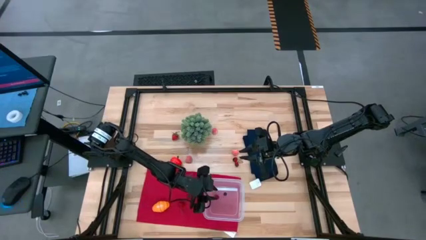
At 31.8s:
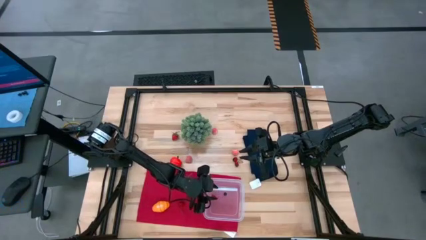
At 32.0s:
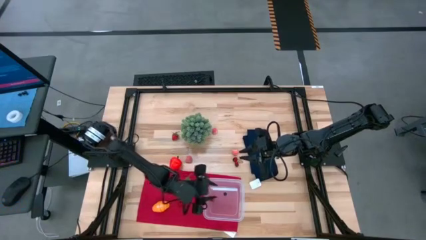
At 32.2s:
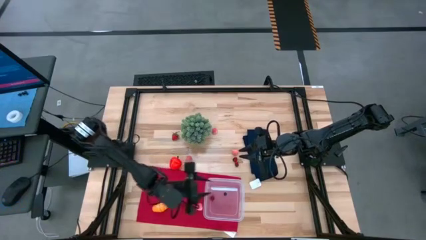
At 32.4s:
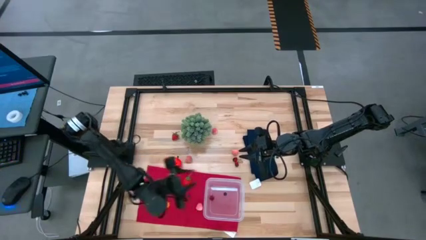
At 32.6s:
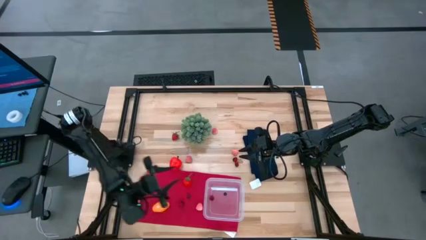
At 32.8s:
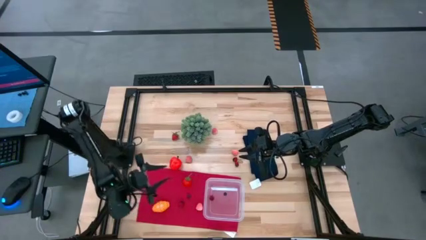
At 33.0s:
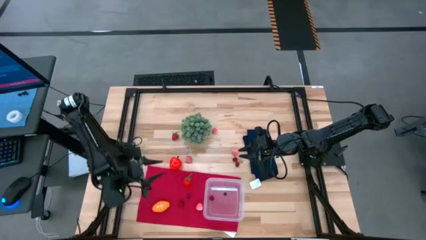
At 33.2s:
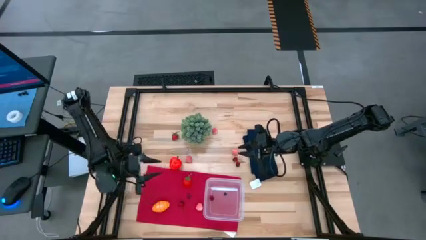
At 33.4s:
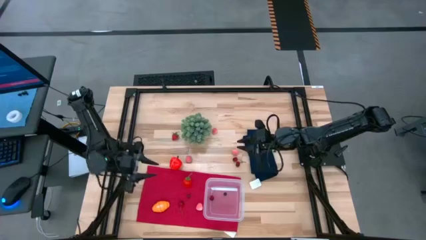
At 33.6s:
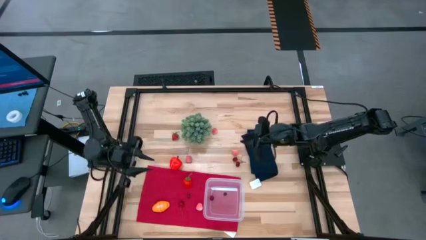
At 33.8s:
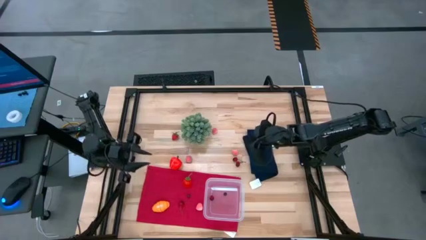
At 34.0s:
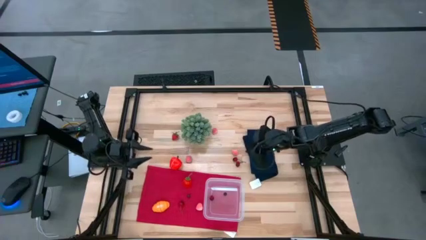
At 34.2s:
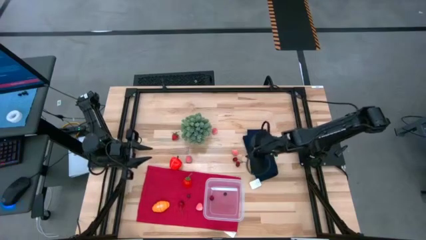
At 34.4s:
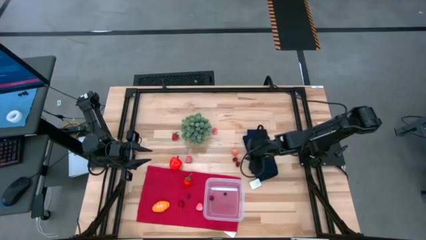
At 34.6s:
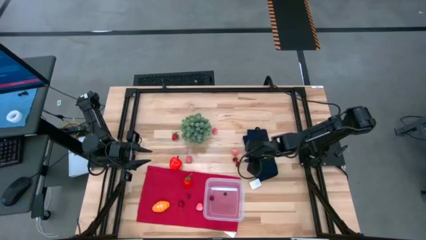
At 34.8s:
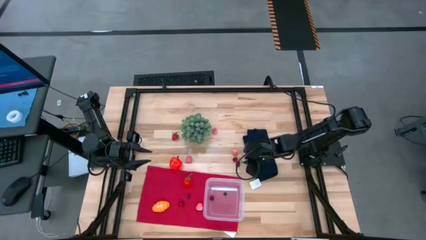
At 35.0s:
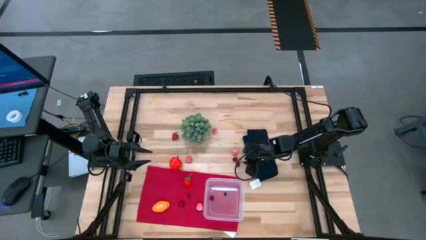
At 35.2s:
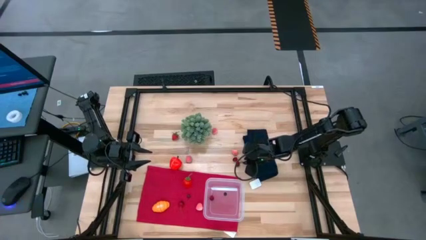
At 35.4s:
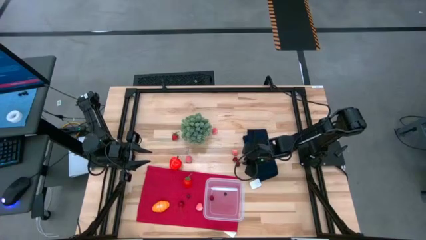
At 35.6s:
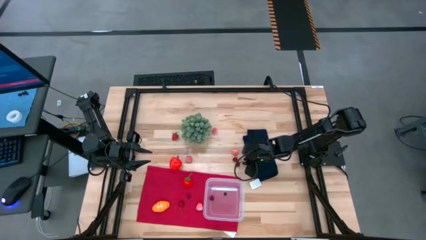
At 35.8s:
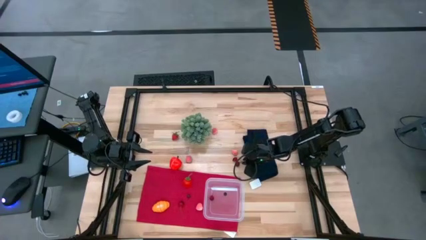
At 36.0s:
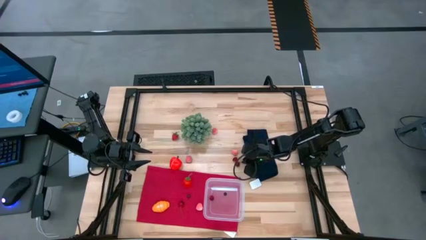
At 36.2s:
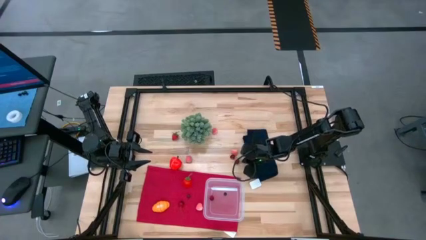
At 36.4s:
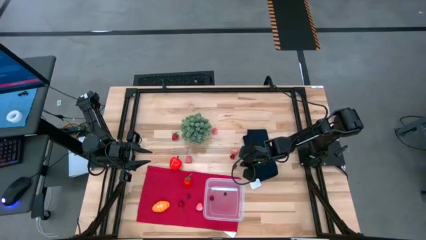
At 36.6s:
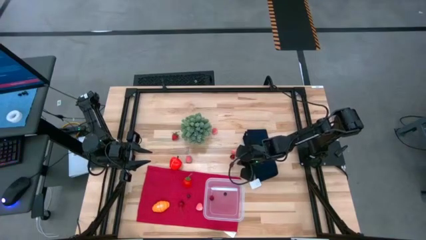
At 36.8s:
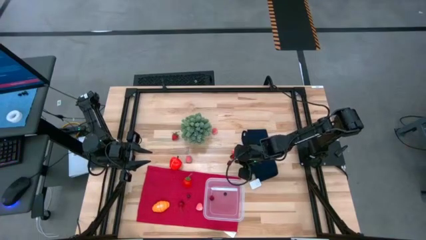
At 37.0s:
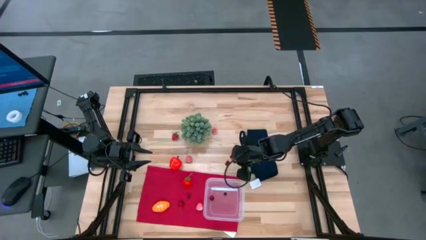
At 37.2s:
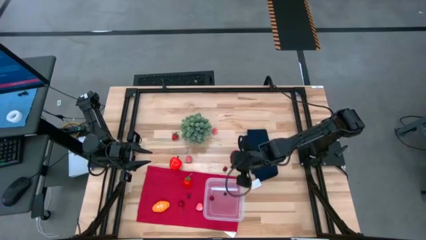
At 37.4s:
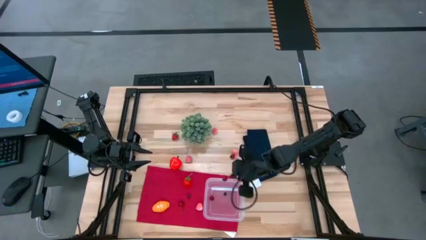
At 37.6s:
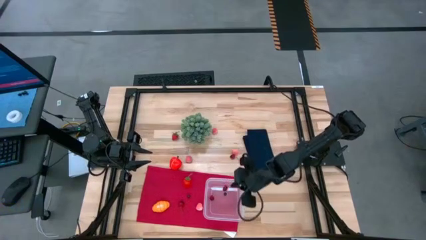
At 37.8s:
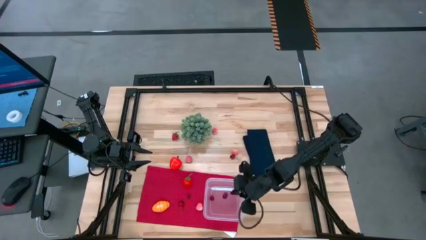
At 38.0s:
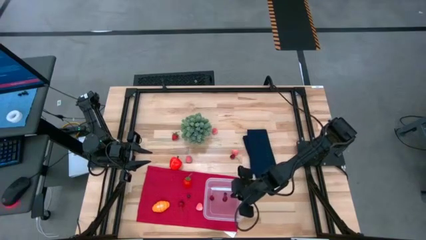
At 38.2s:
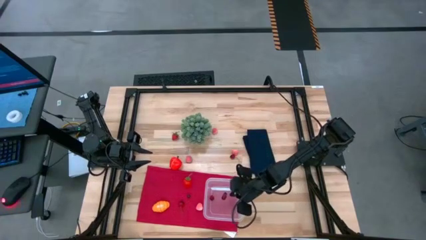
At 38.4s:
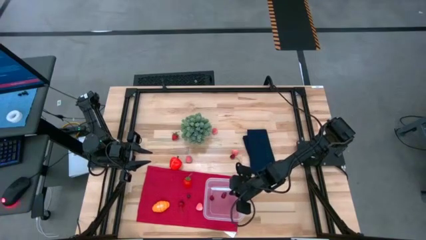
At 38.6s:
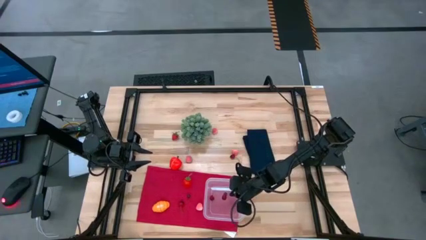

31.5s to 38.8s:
Task: Pick and placing Produce into tupperware
Put the middle cherry into the transparent bin

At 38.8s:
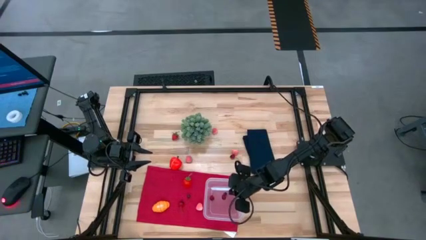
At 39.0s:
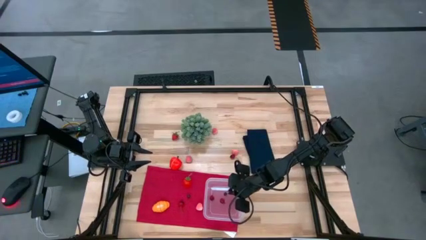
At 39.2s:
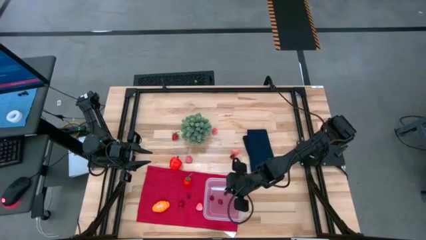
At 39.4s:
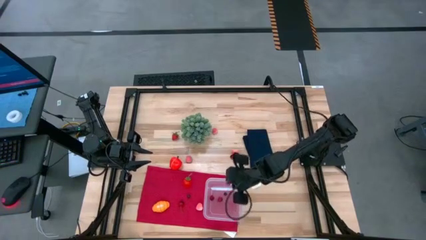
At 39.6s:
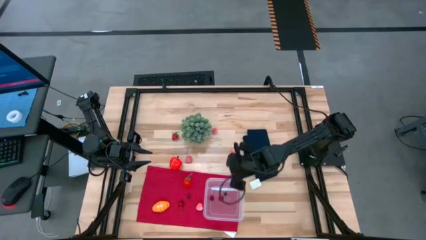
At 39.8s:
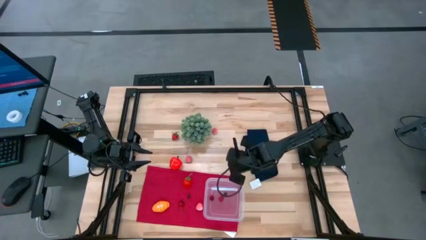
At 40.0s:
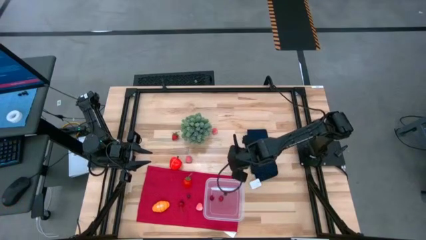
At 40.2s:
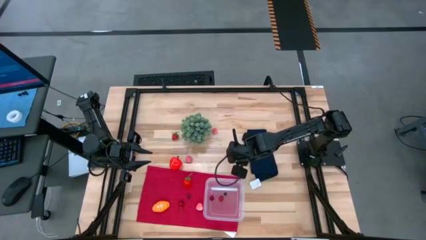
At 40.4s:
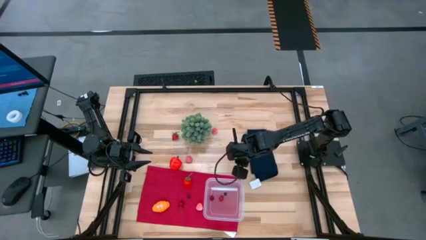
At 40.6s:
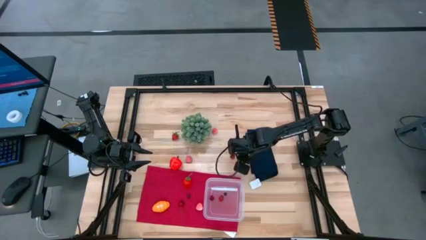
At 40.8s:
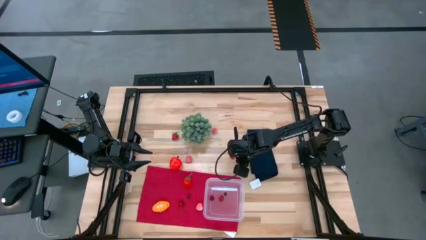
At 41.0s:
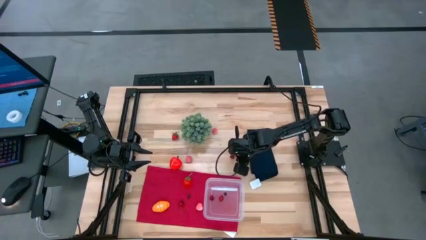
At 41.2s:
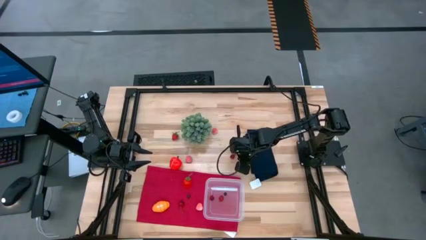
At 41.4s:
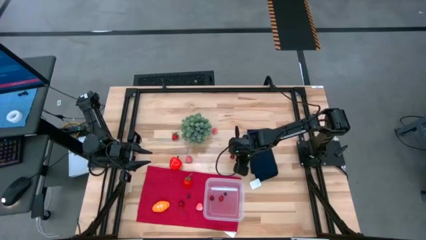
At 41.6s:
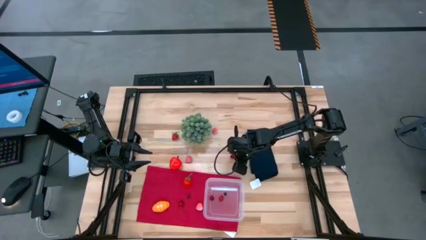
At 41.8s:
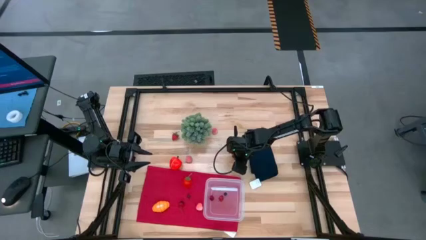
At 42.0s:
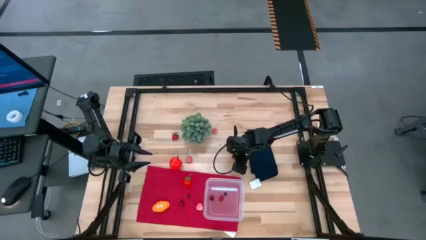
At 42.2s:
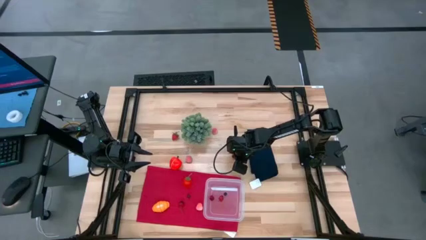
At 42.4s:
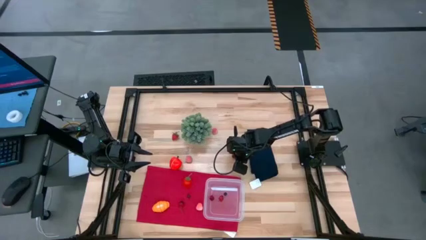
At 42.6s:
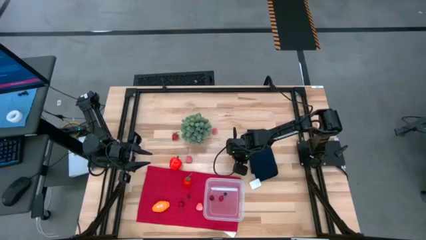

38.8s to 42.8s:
Put the top cherry into the transparent bin

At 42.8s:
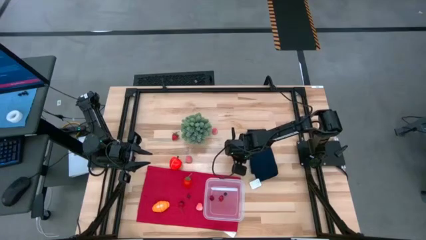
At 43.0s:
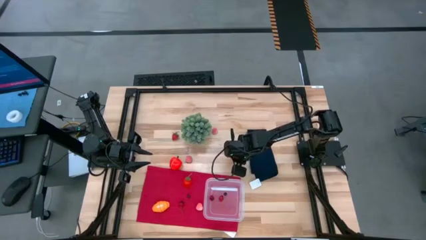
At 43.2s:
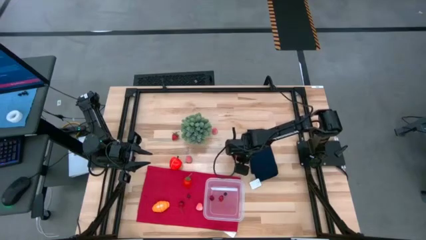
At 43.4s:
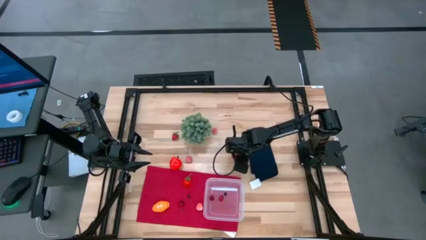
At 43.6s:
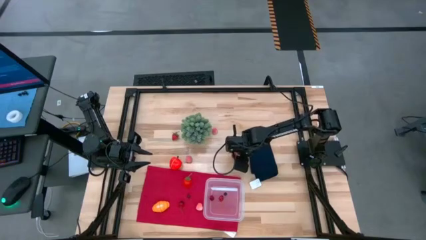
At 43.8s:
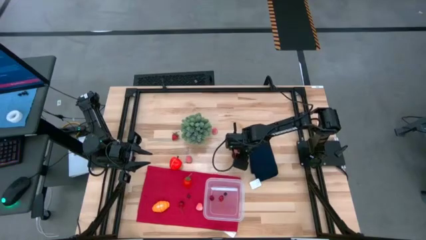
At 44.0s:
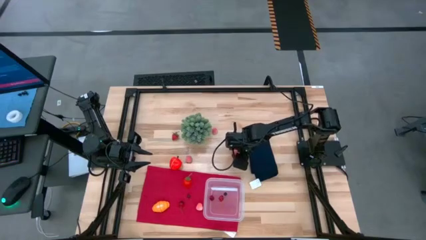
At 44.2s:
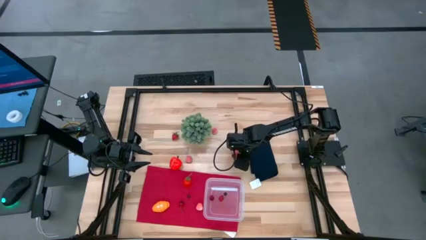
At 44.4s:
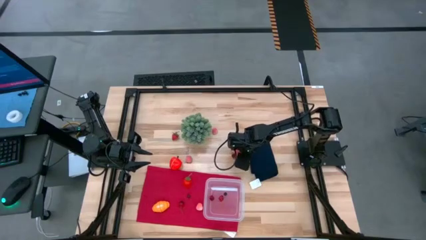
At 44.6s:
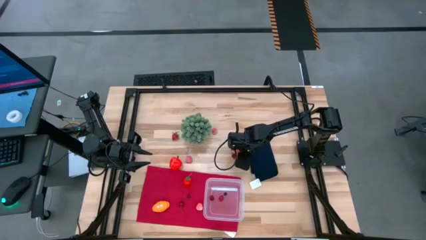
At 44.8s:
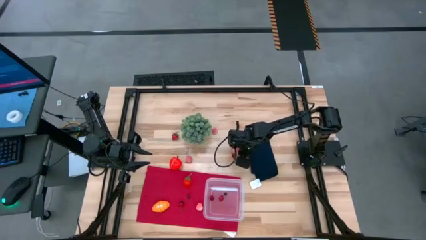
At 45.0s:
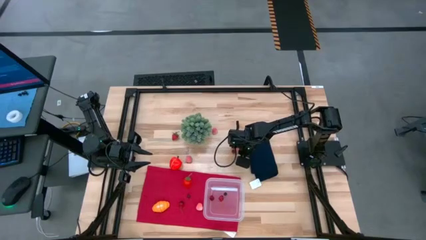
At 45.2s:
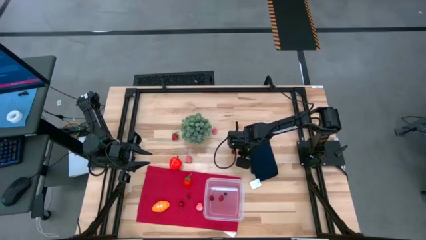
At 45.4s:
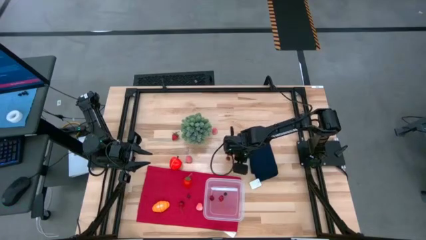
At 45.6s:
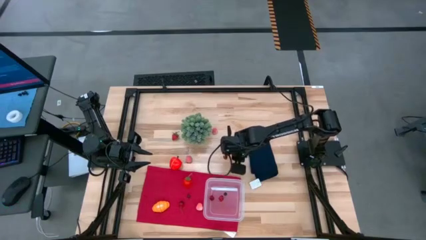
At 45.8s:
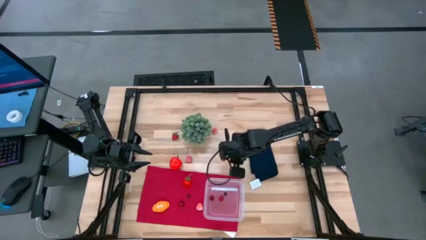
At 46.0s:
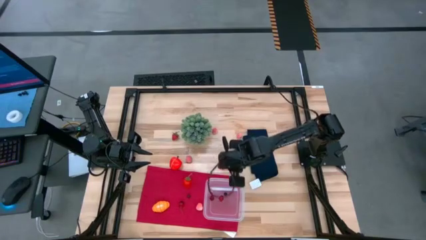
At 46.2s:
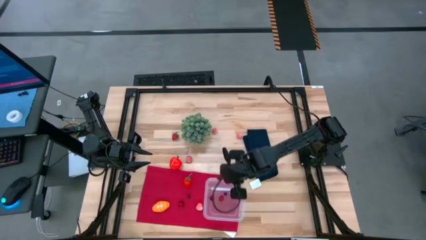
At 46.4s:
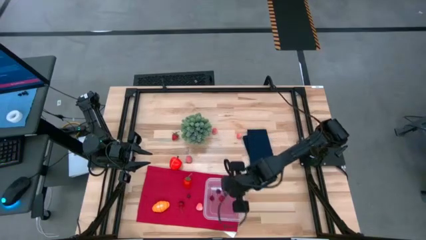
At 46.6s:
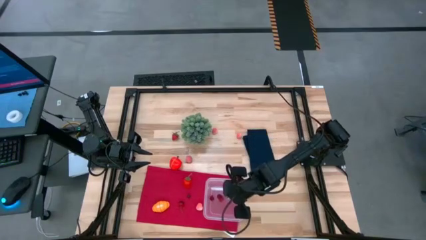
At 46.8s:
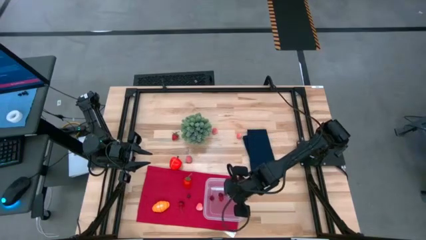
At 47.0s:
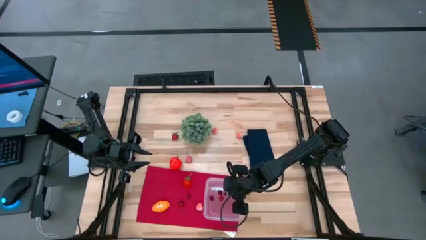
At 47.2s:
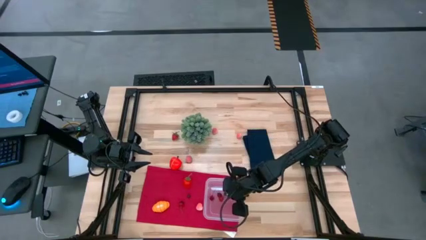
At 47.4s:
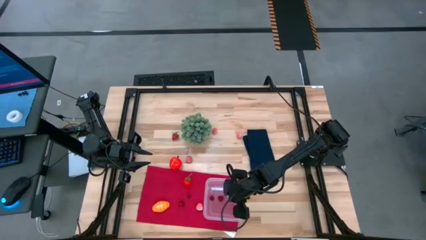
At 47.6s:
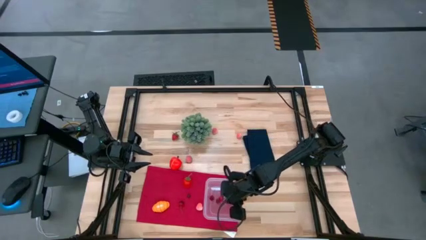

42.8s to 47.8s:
Put the top cherry into the transparent bin

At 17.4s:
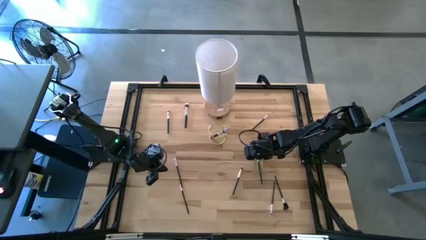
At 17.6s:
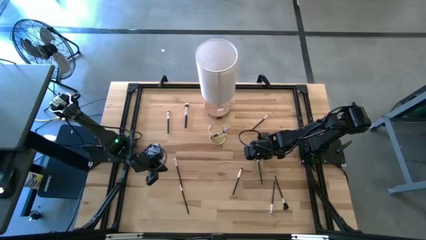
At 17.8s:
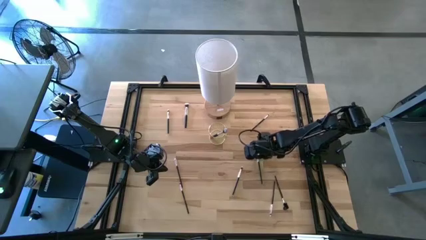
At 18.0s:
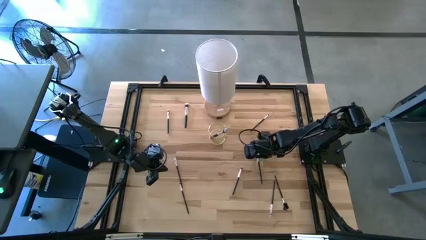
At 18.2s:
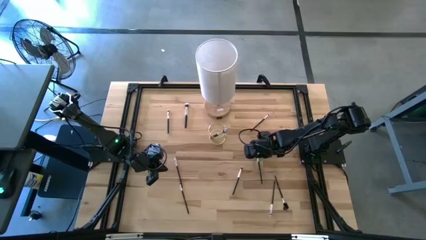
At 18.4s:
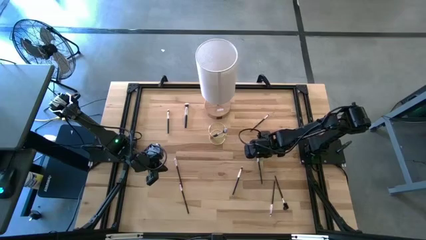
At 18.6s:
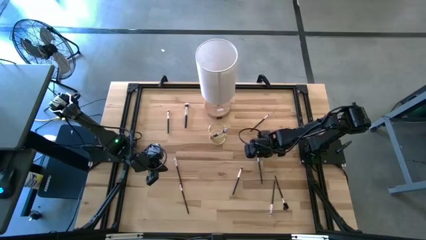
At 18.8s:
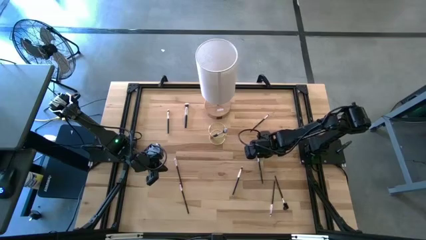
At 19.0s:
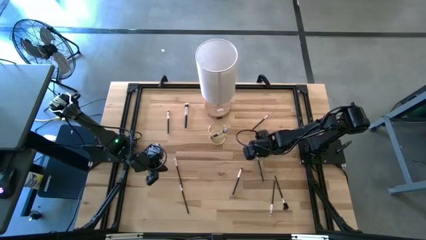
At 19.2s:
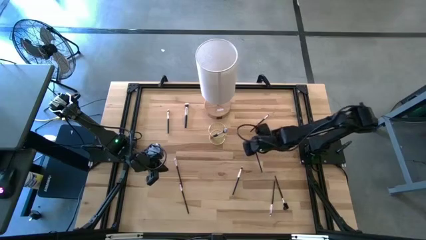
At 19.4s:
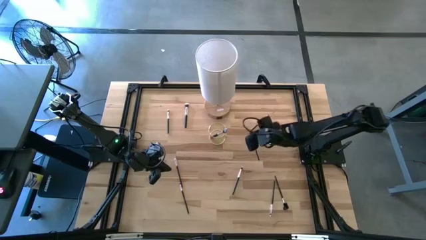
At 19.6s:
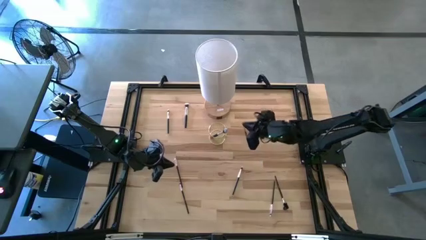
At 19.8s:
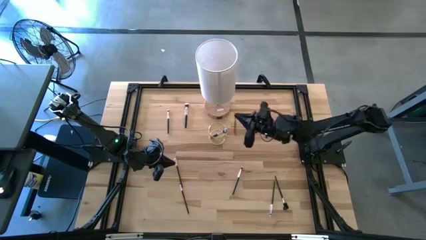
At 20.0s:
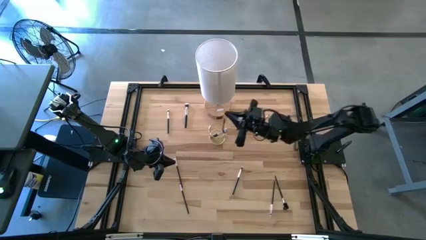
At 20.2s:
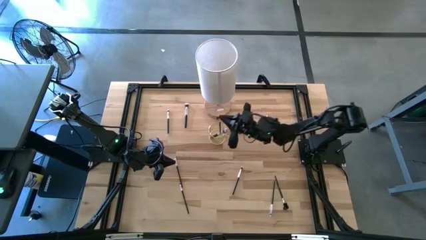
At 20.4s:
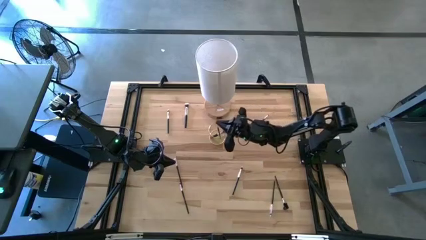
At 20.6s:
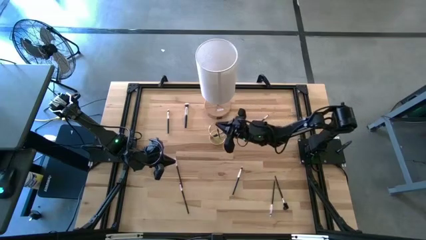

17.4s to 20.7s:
Task: Put items in baskets/containers
Put the black liner brush into the gold pen organizer
